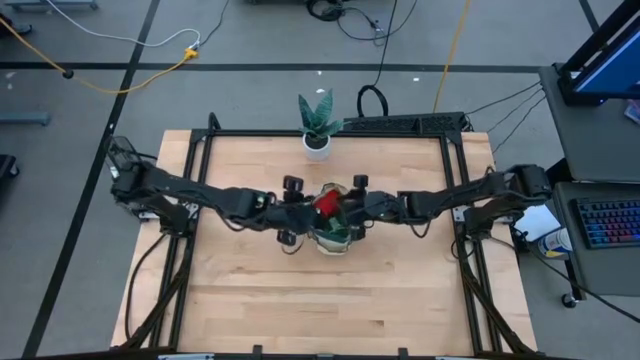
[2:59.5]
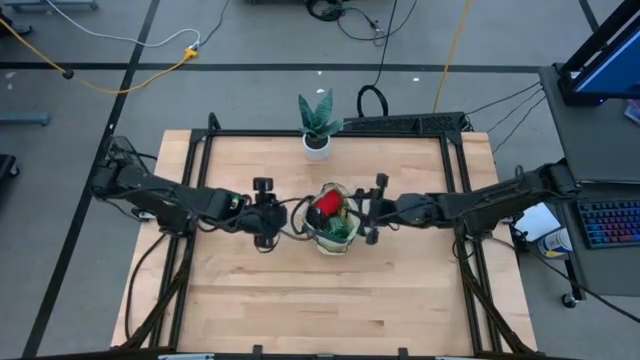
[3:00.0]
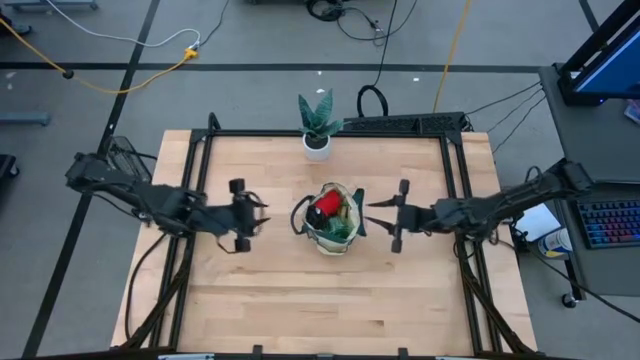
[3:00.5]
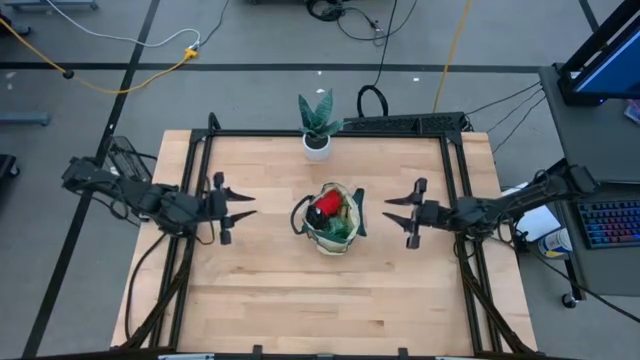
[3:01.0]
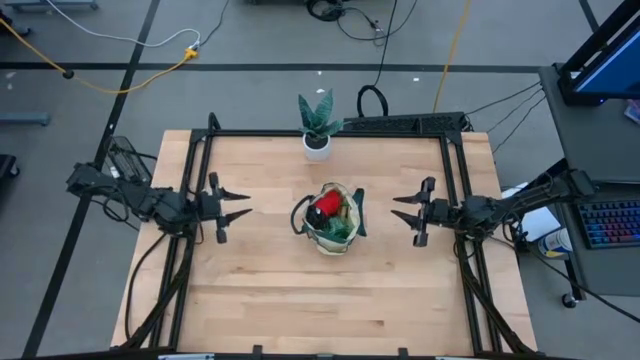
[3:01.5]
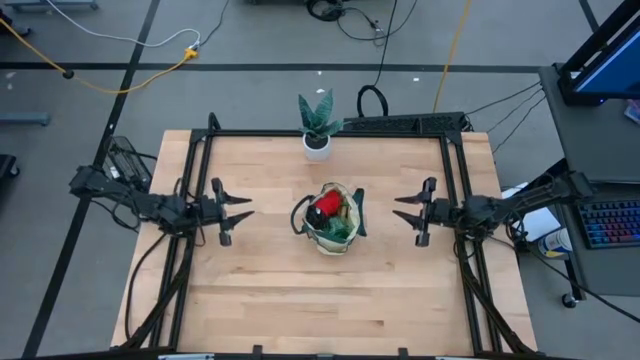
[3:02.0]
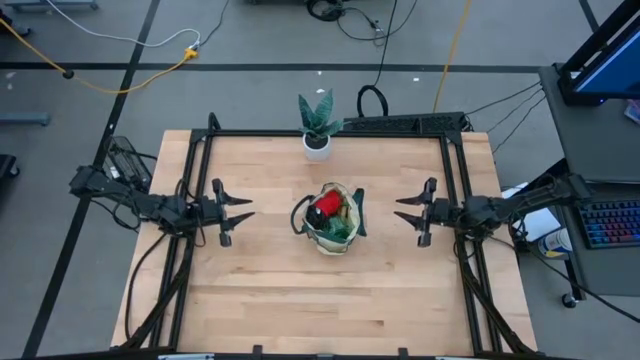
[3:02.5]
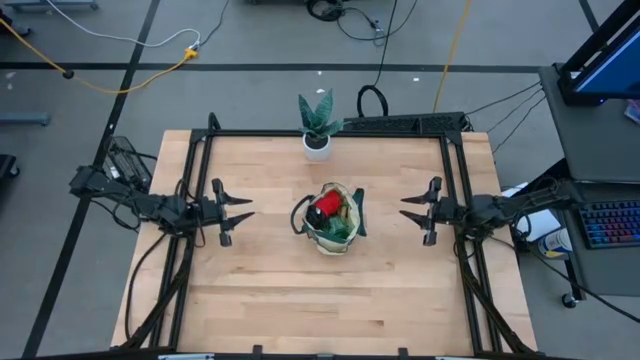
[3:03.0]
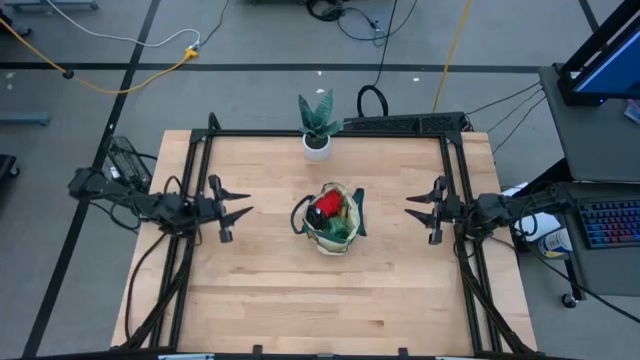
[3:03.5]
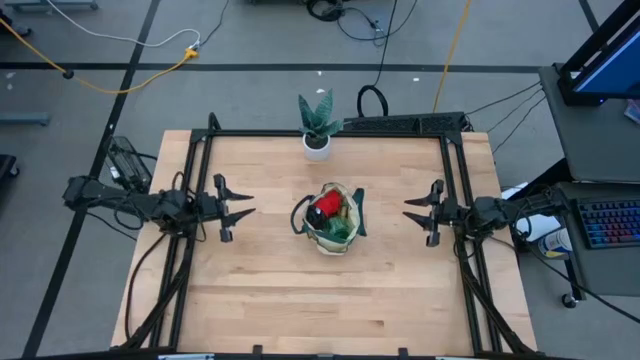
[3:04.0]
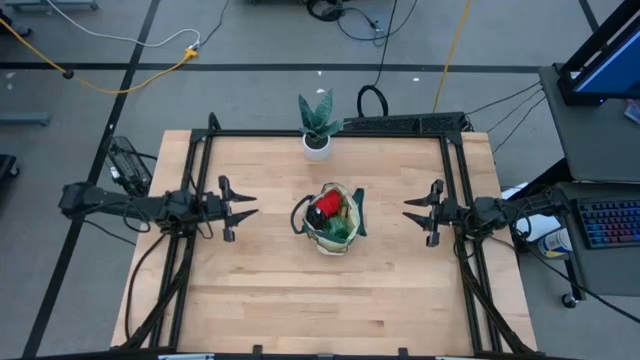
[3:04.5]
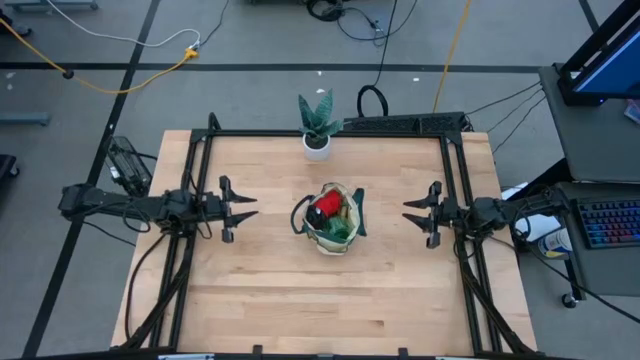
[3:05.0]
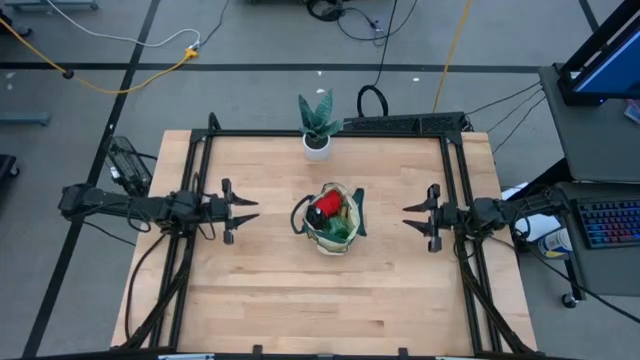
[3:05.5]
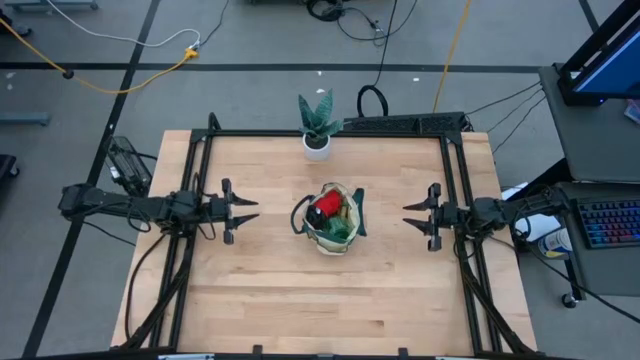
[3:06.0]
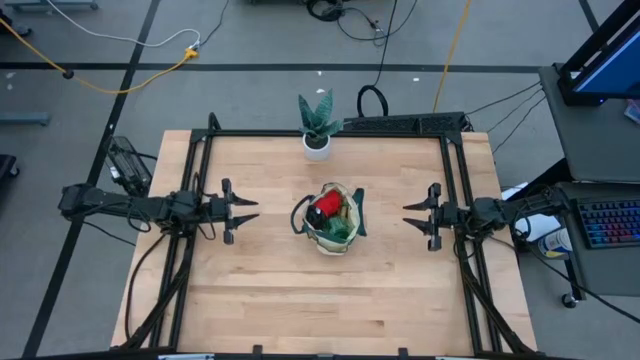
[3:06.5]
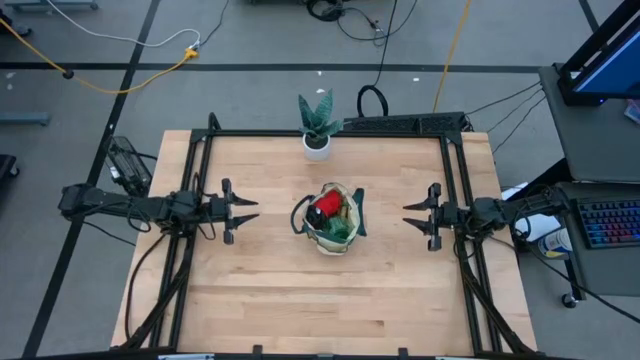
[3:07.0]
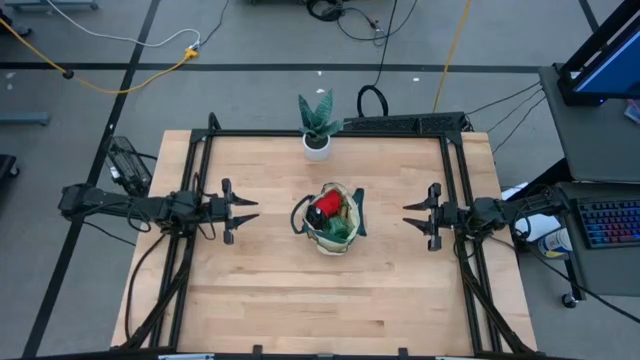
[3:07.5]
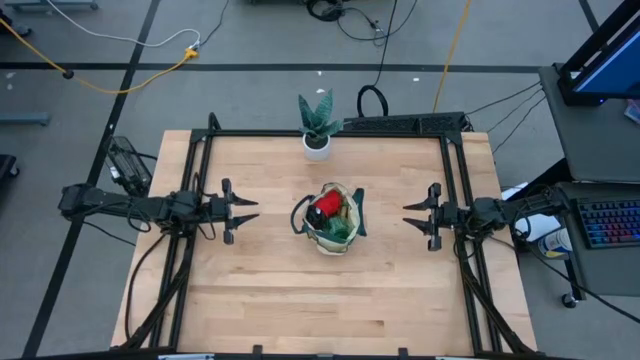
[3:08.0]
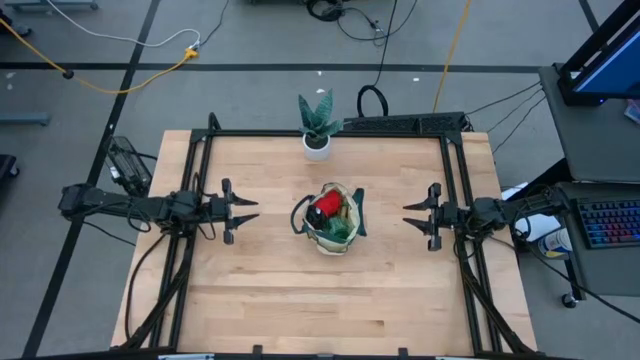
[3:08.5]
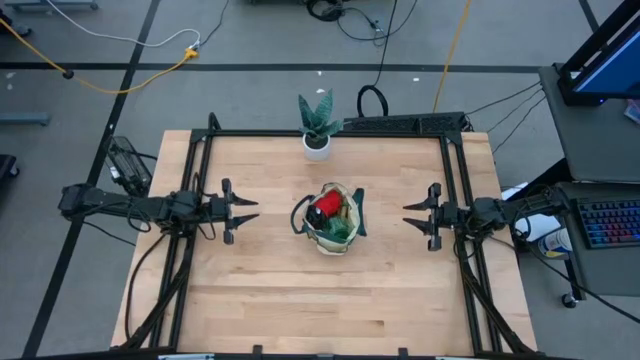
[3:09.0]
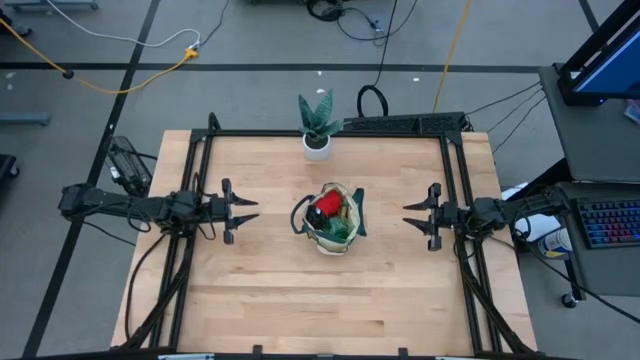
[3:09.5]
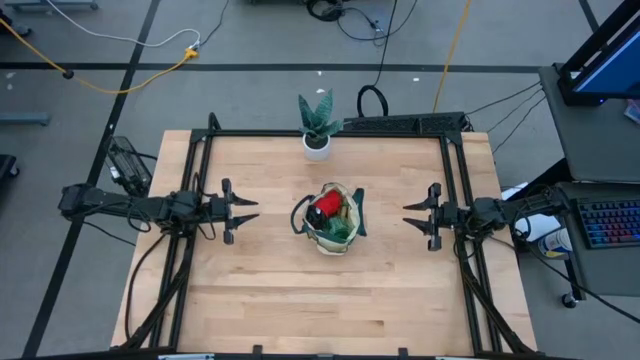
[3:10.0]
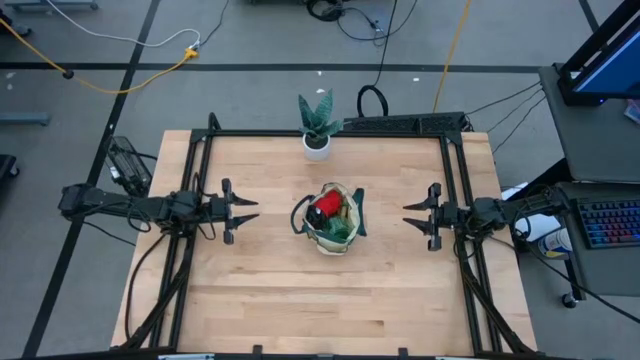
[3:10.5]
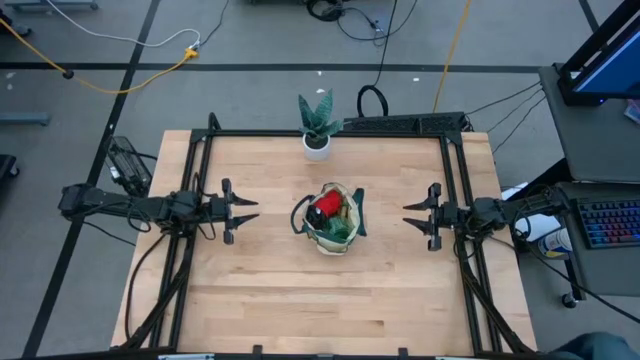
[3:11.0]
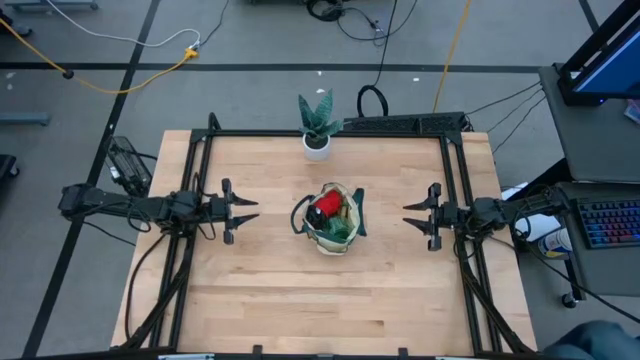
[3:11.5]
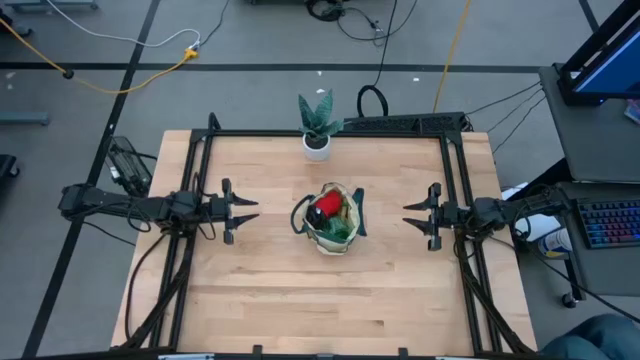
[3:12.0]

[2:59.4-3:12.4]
Task: Pick & Place Garden tools in Gardening bag
Return to Home Position

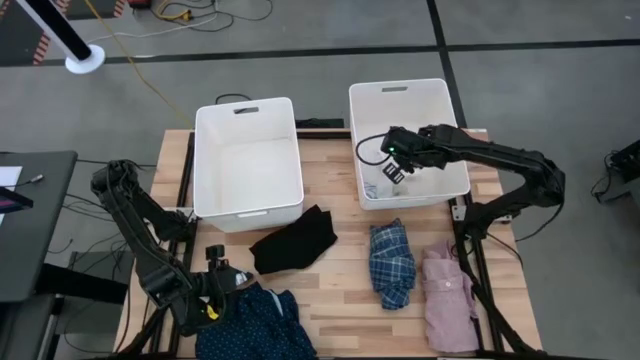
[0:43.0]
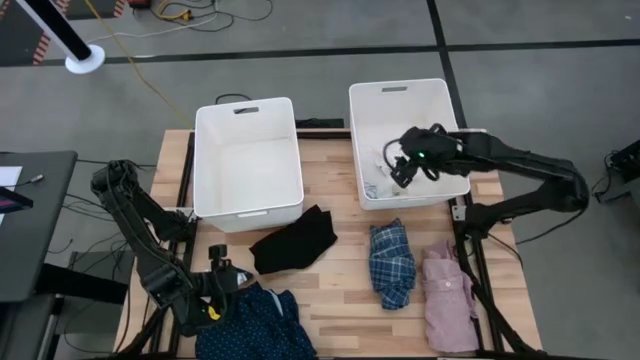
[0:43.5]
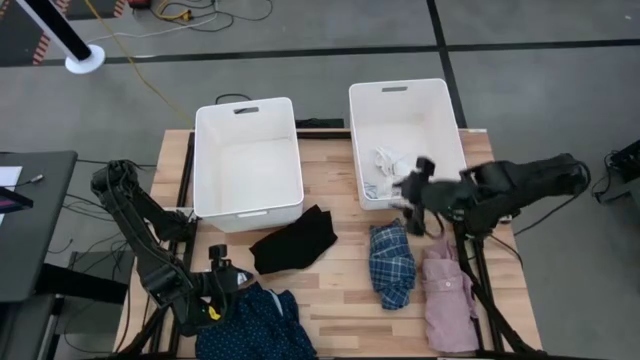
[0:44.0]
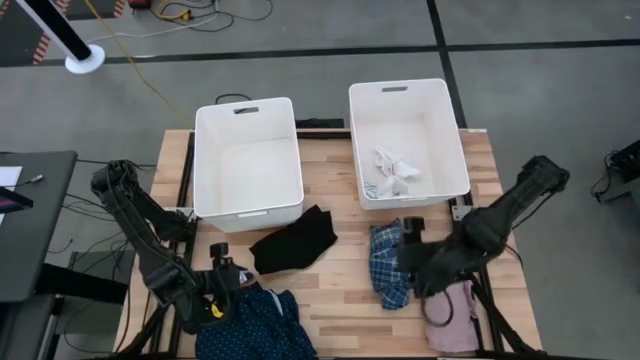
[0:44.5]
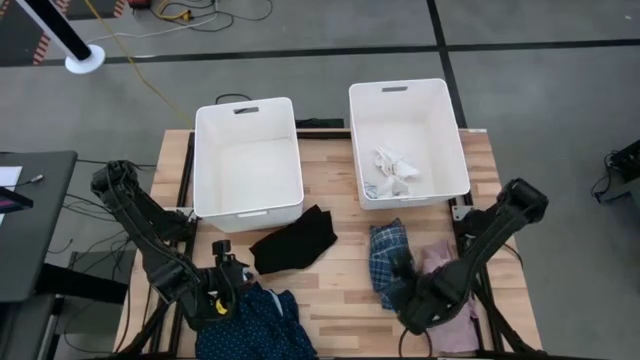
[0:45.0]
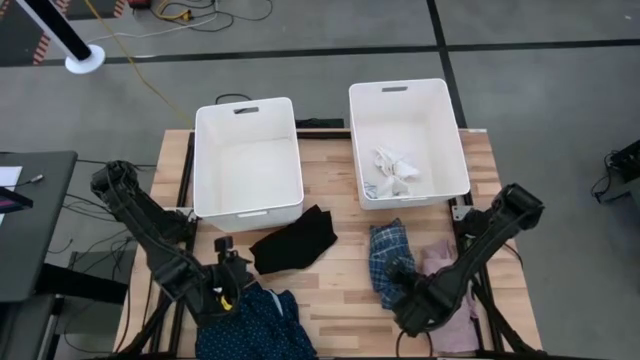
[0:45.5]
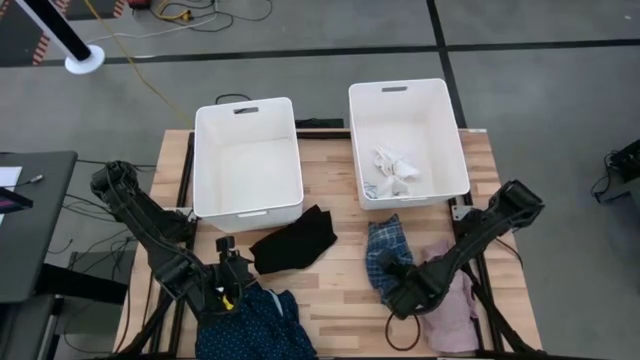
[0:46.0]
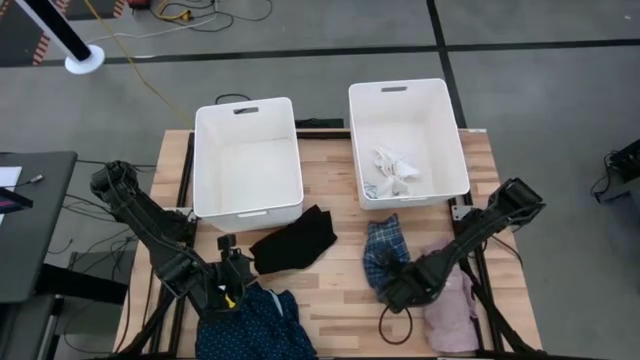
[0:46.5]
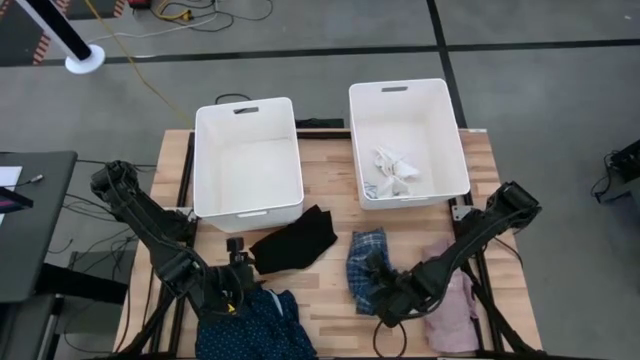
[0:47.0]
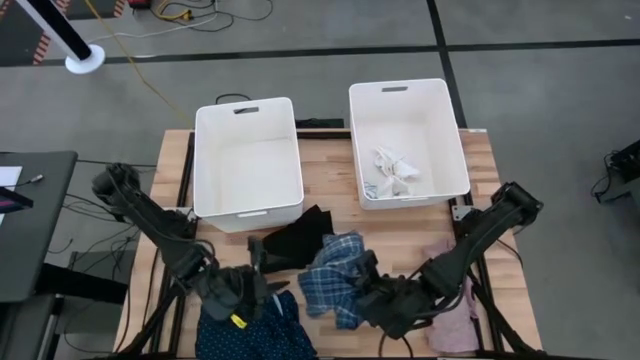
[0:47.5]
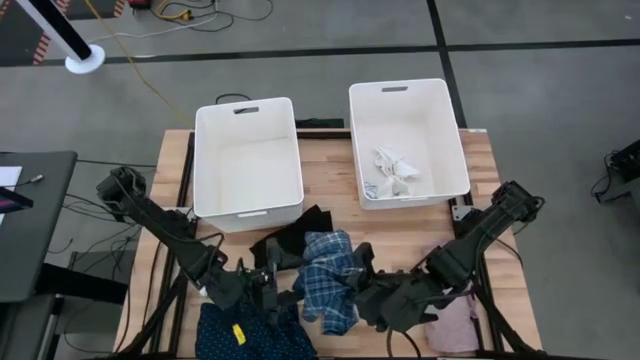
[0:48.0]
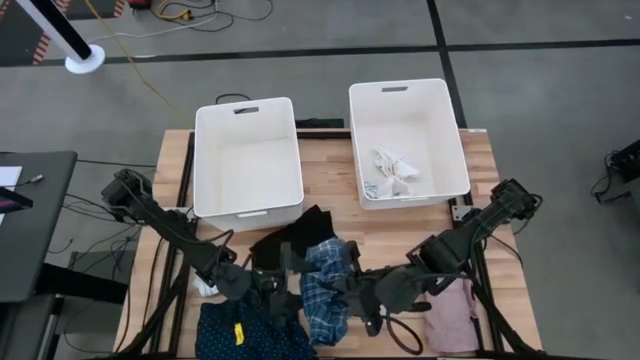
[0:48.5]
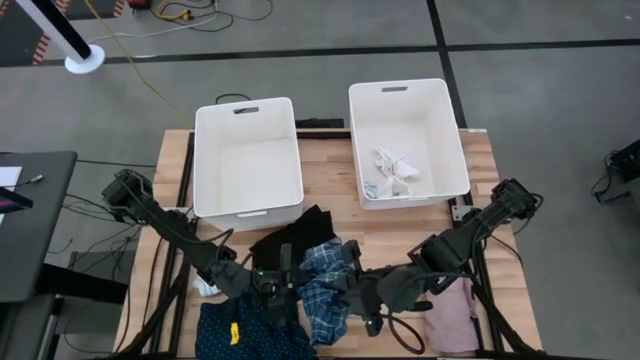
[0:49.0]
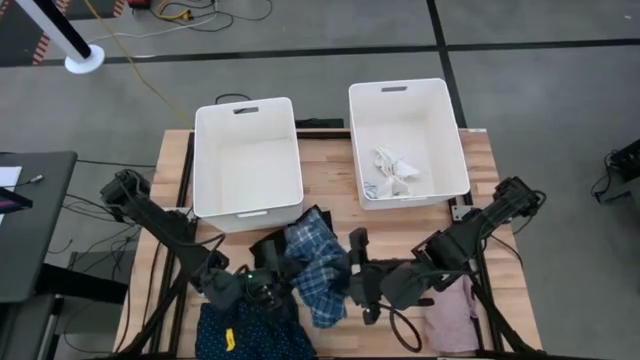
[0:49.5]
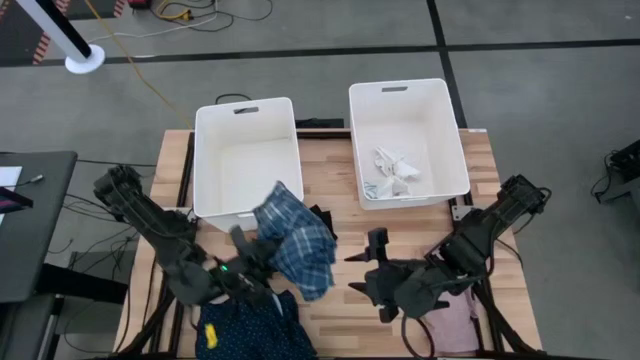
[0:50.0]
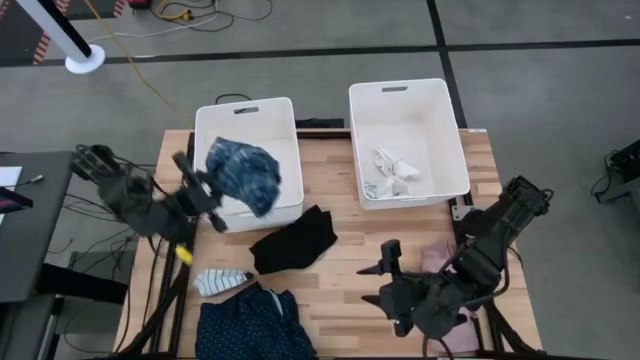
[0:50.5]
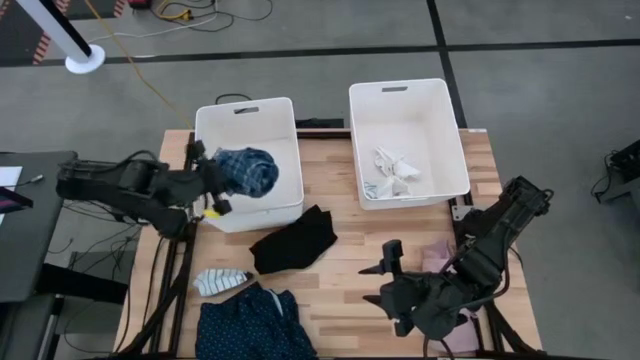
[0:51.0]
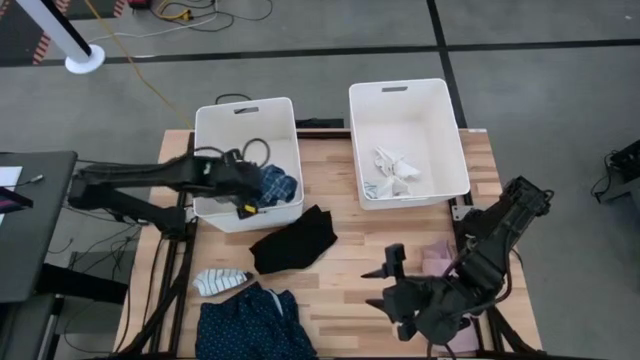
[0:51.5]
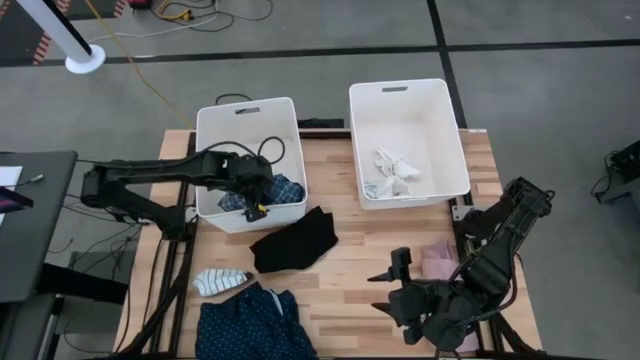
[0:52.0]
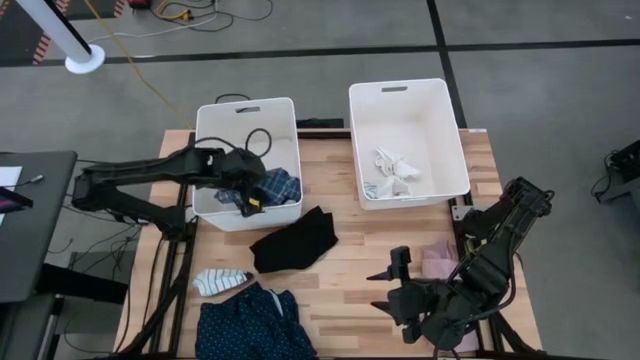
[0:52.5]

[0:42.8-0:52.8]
Task: Sort clothes
Put the checkered shirt into the left bin
